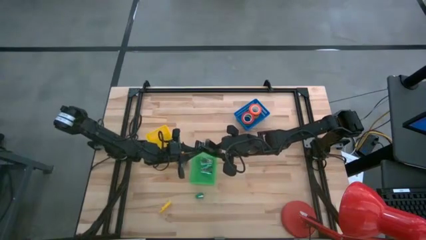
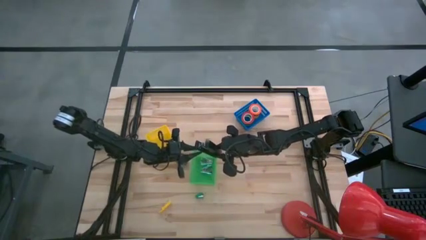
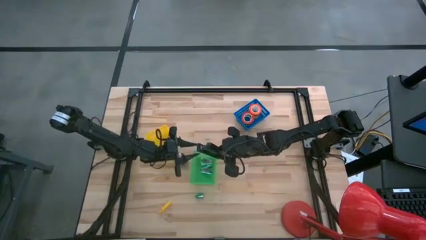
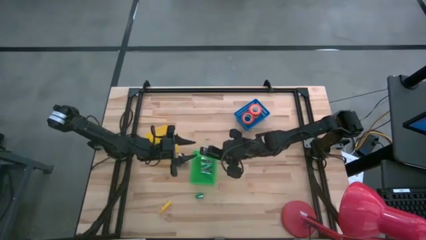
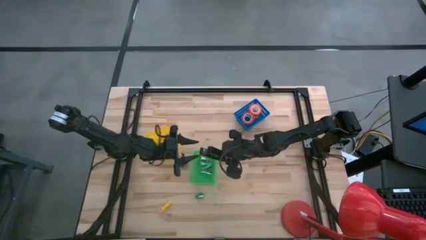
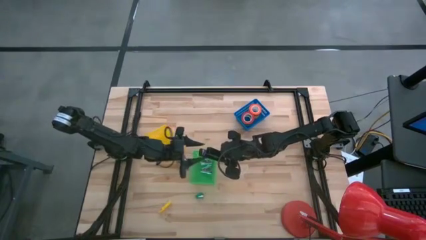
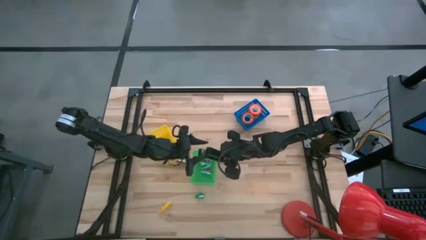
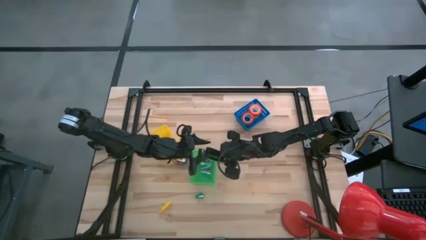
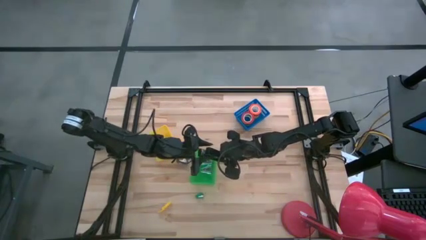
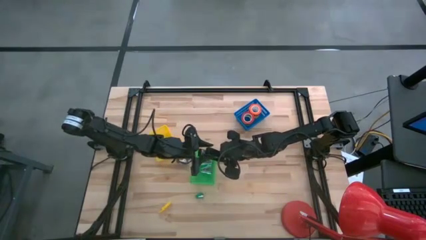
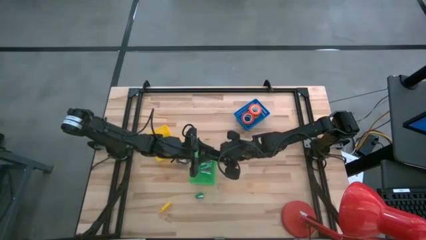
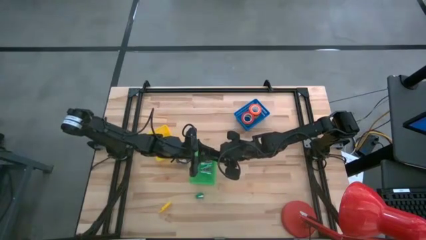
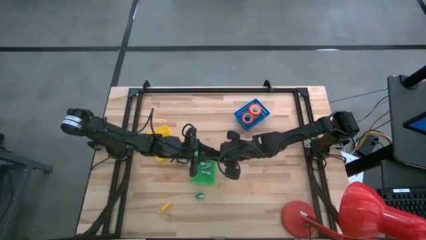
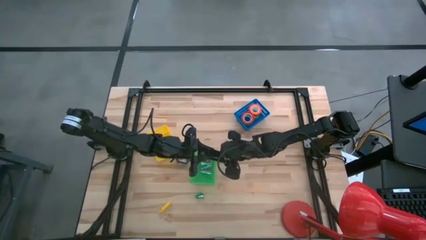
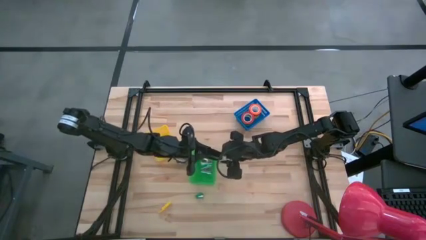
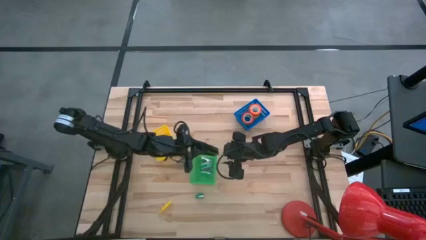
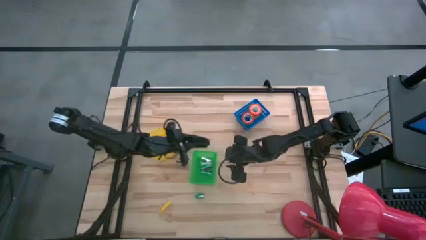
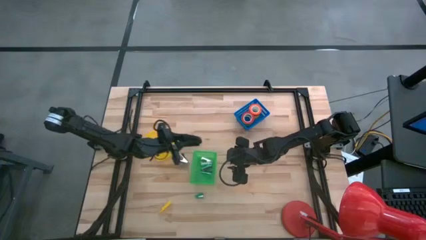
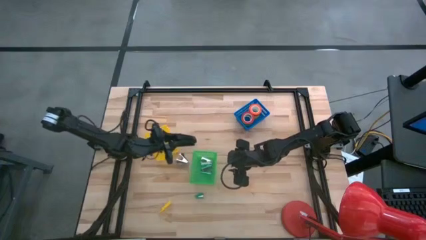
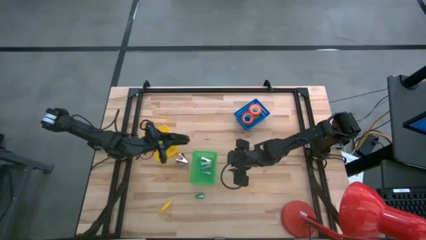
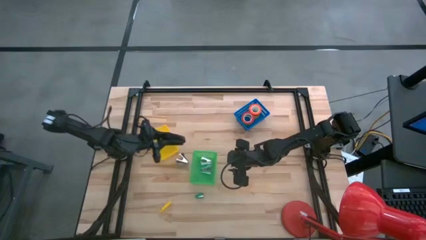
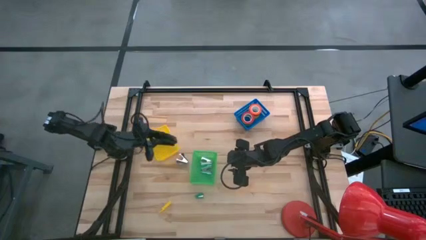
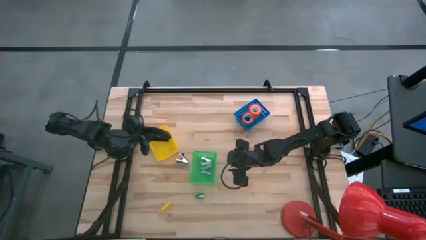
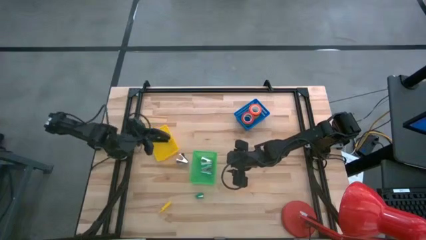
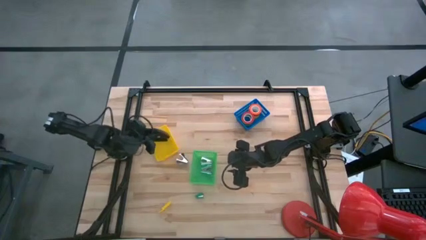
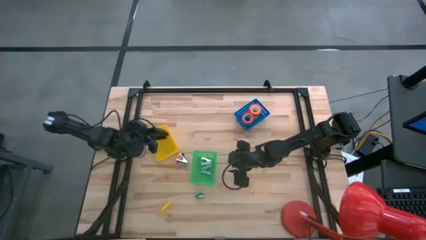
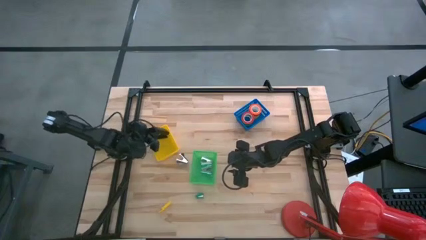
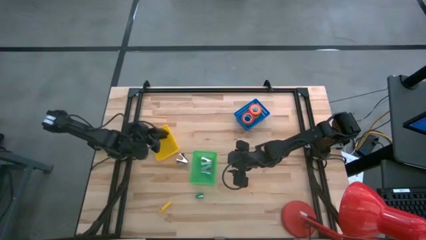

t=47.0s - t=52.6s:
Task: Pick and place Stapler, Stapler remover, tape
Put the black stapler into the yellow bin

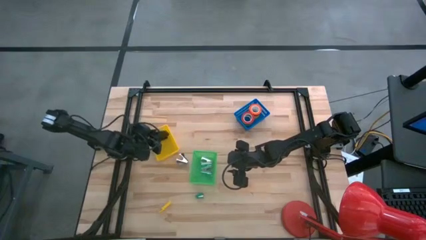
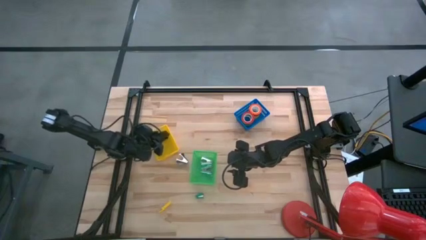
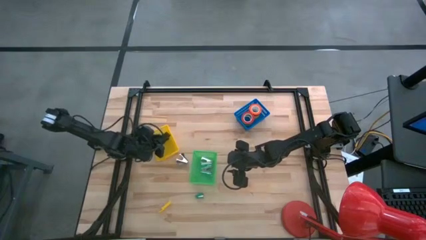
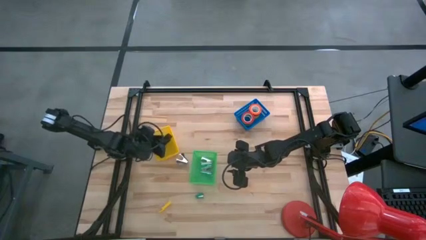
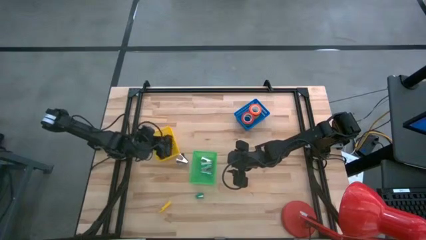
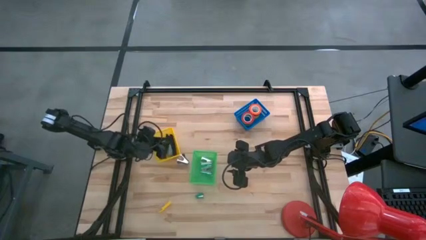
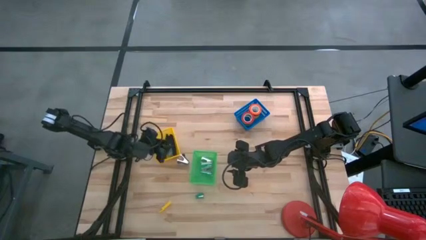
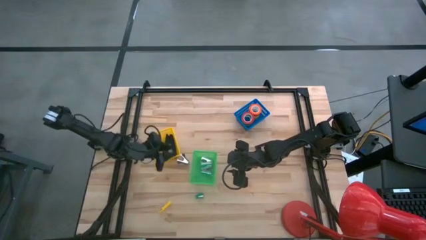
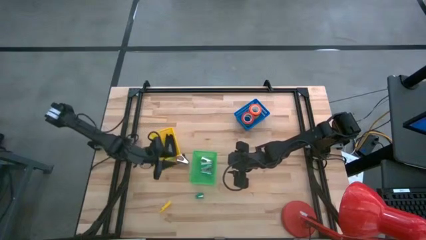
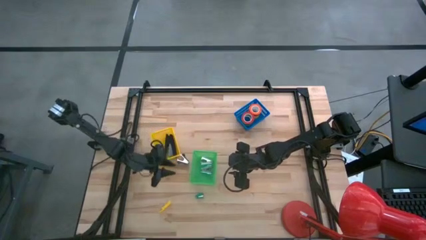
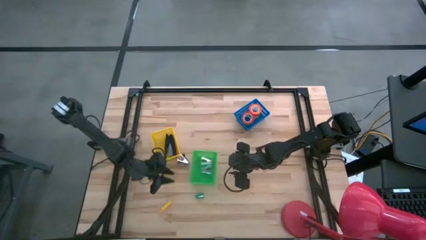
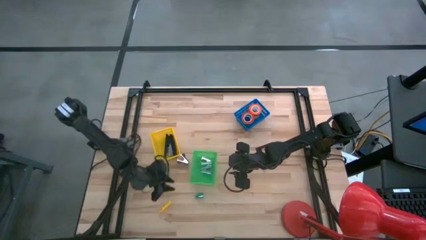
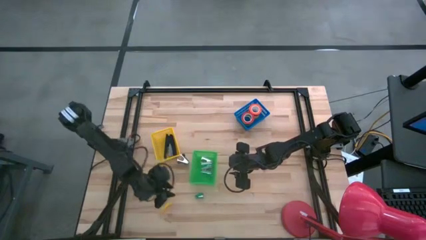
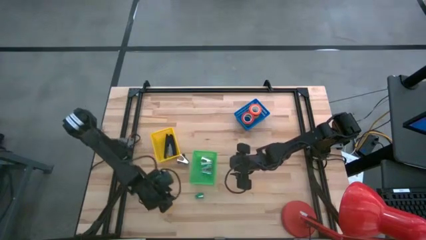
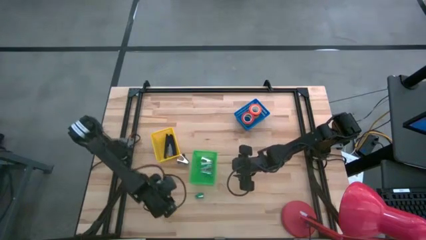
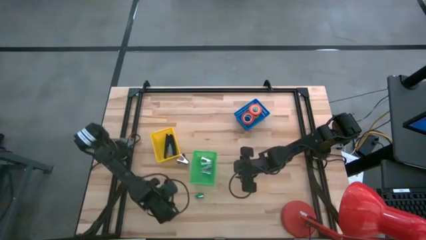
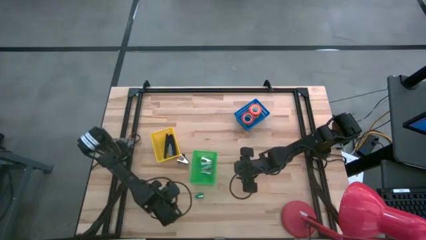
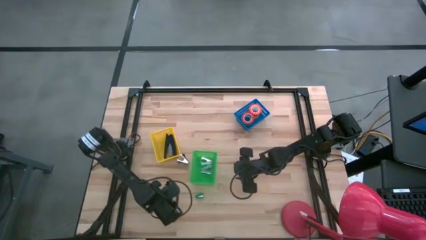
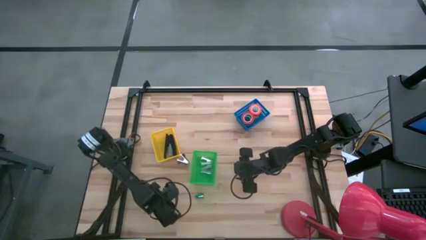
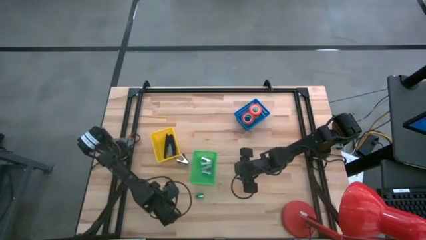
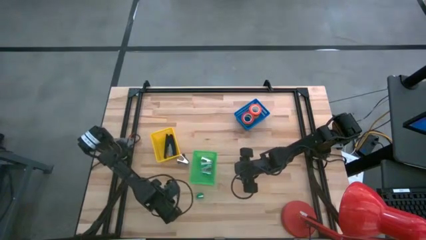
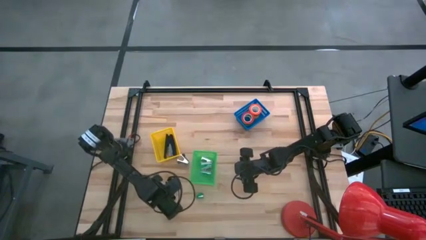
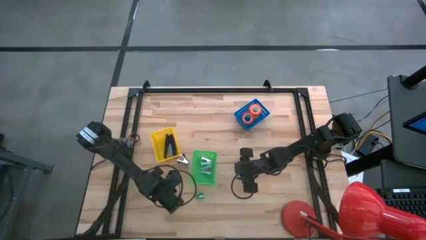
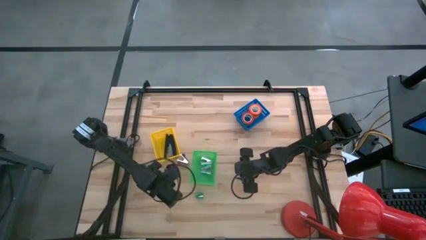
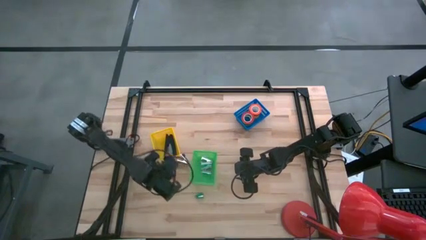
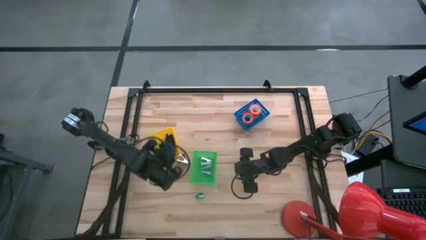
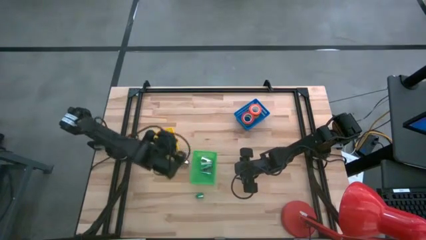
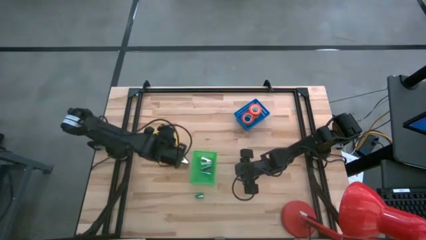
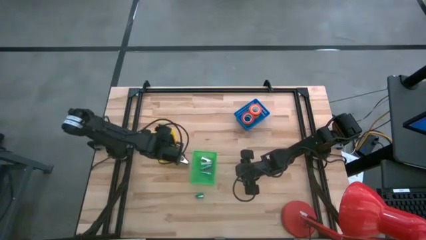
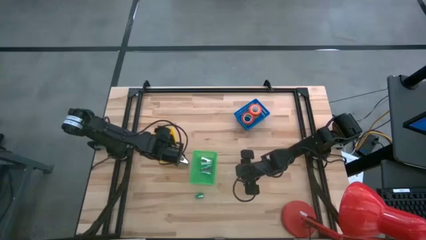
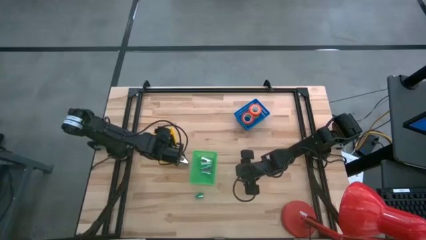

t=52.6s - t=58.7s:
Put the yellow stapler into the yellow bin

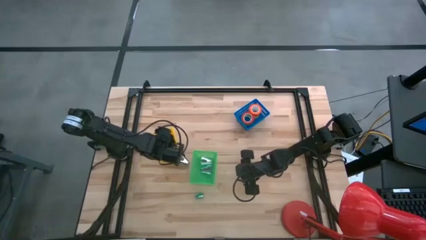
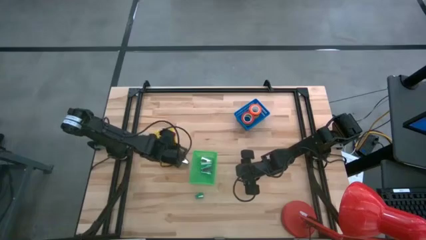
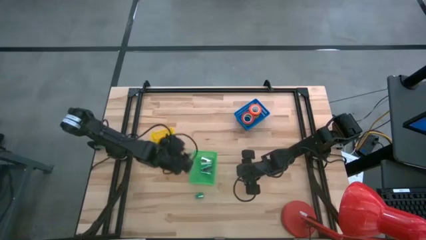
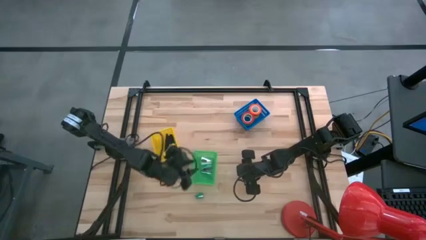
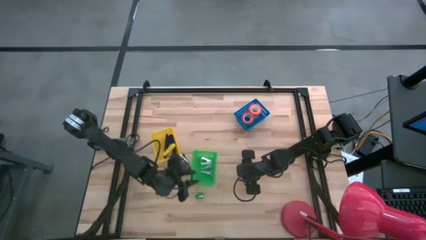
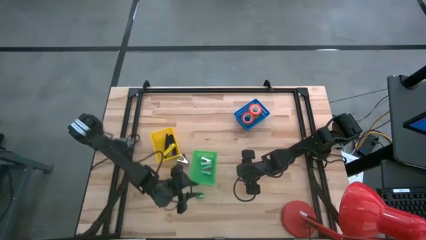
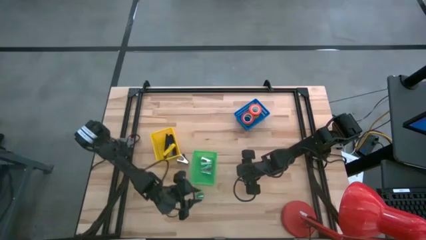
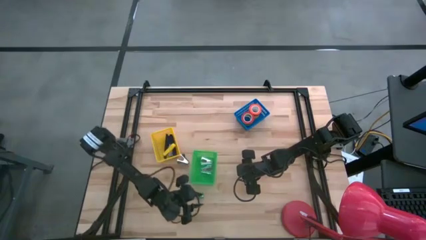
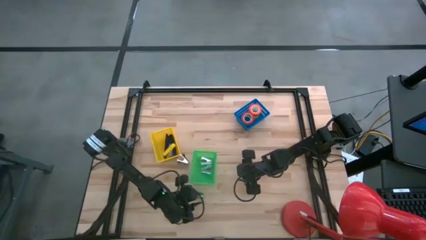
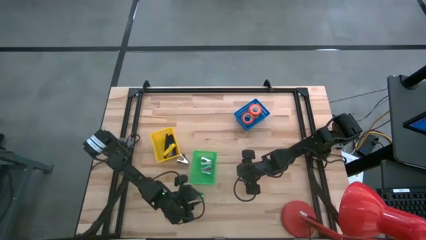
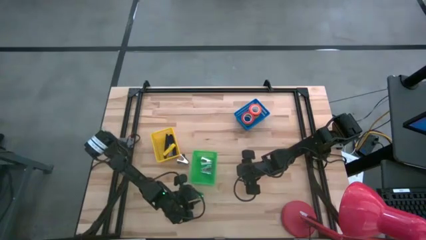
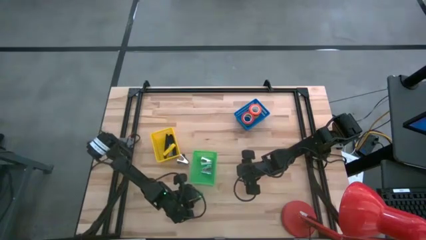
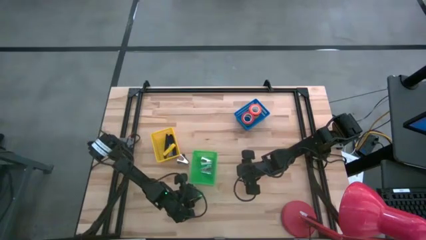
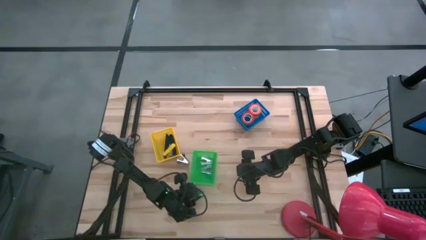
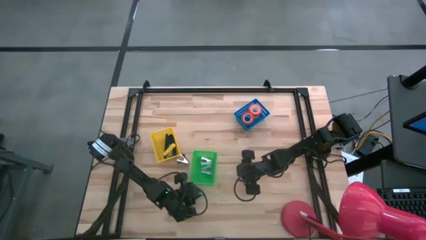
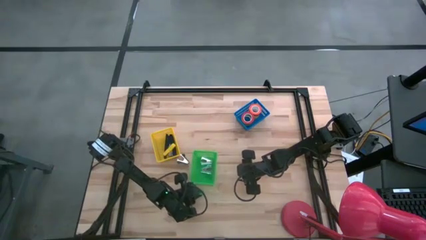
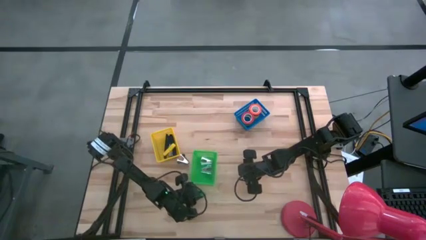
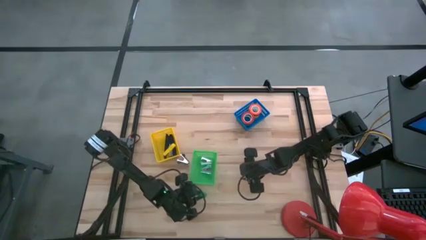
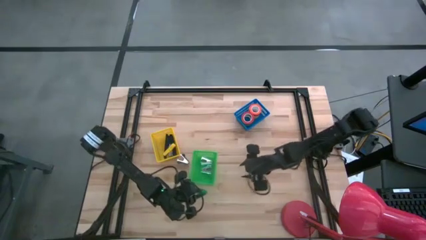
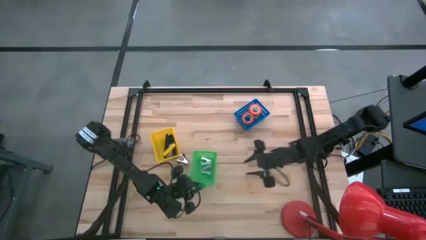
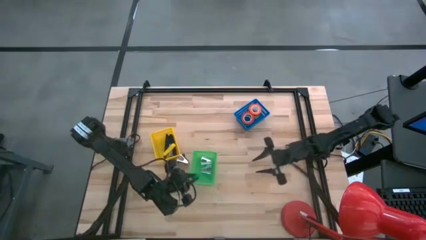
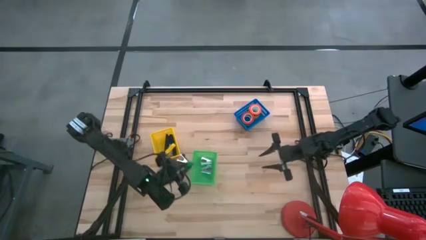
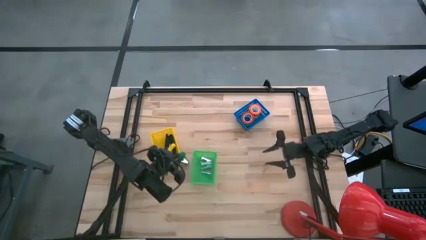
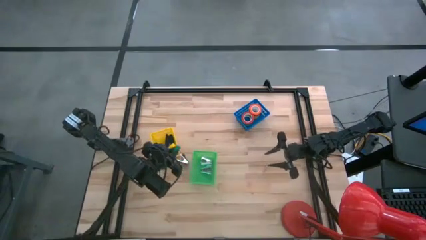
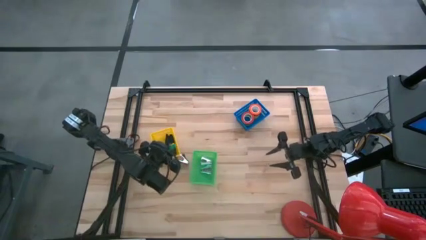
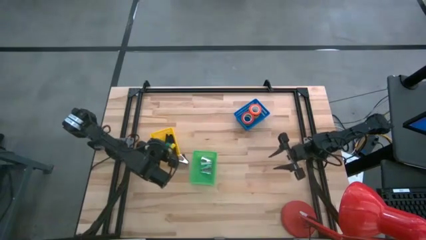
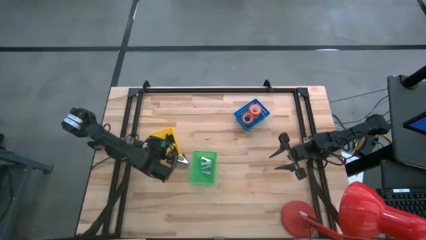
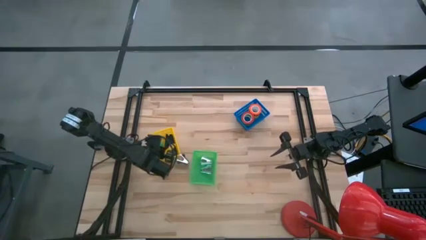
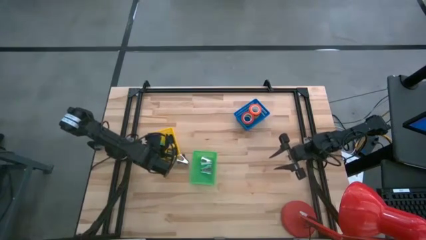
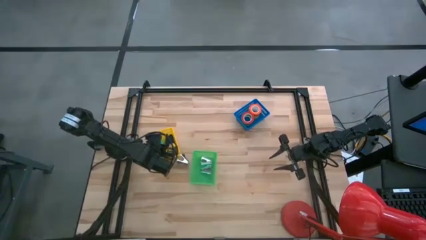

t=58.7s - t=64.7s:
Put the green stapler into the yellow bin
